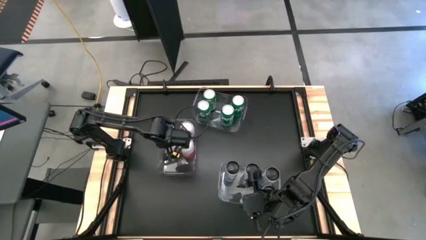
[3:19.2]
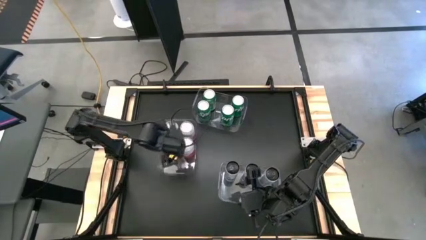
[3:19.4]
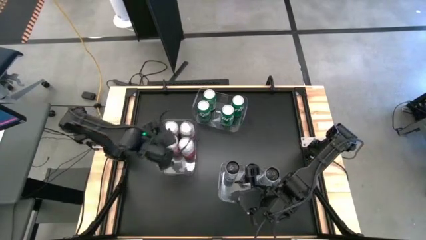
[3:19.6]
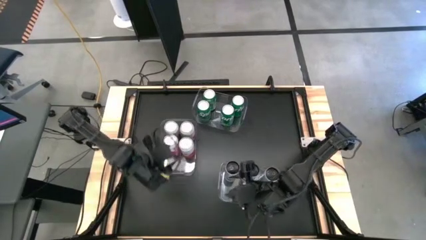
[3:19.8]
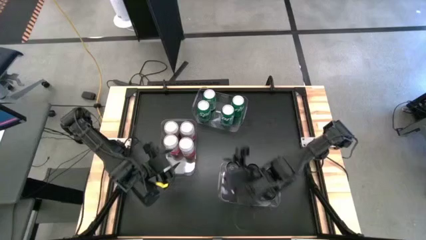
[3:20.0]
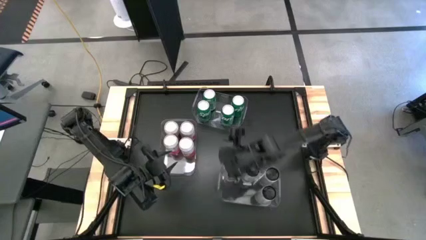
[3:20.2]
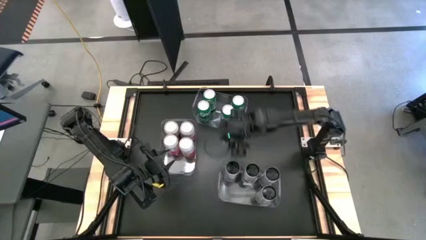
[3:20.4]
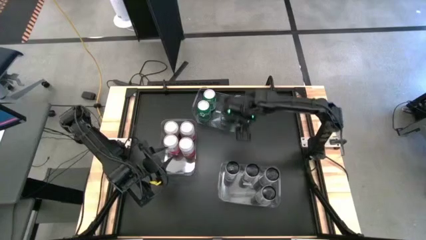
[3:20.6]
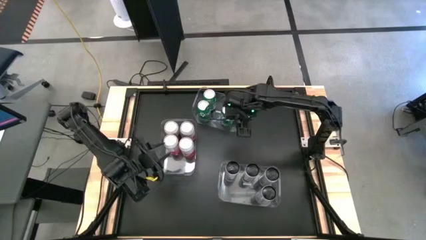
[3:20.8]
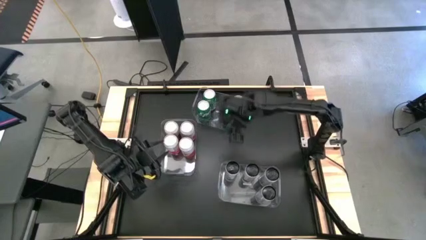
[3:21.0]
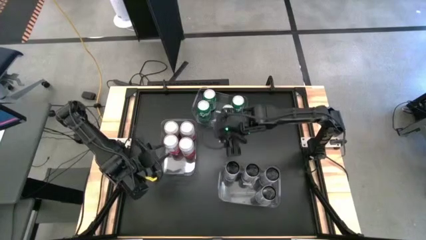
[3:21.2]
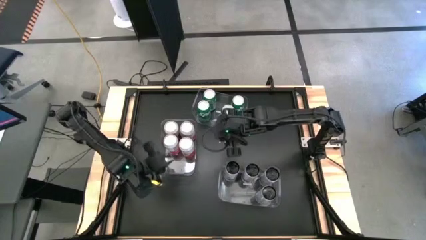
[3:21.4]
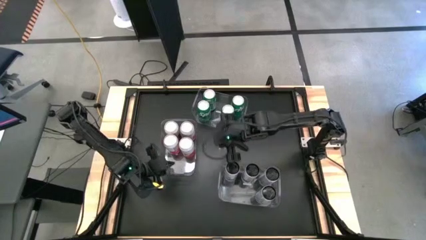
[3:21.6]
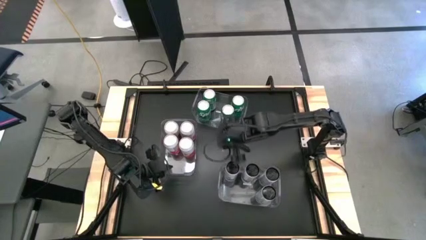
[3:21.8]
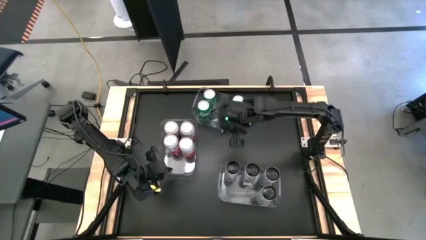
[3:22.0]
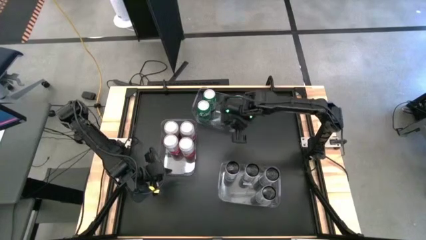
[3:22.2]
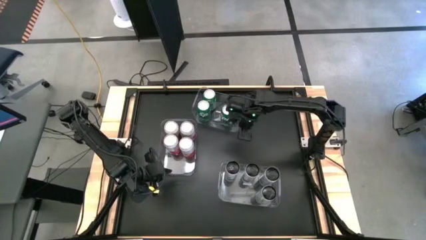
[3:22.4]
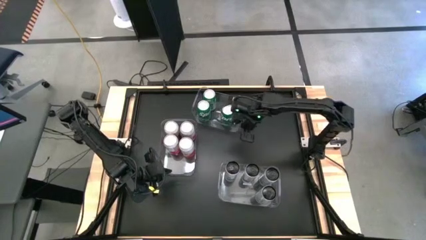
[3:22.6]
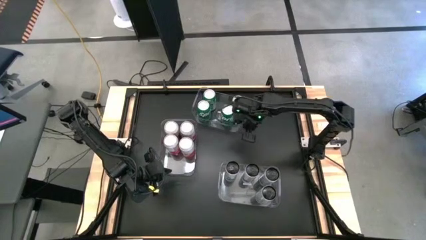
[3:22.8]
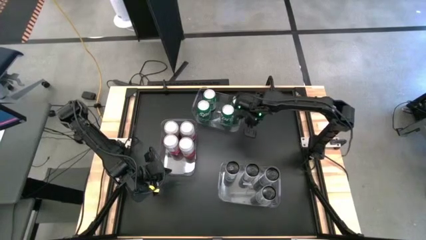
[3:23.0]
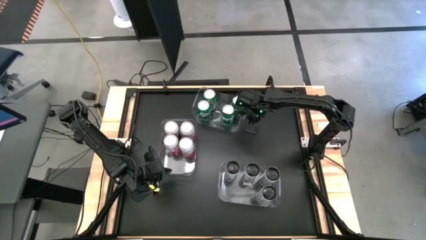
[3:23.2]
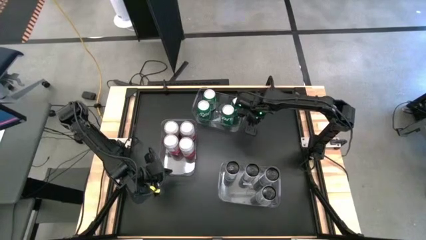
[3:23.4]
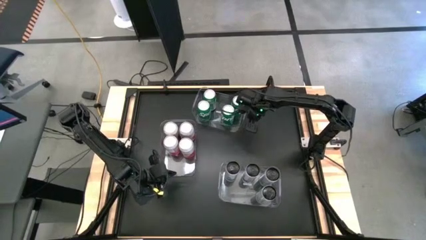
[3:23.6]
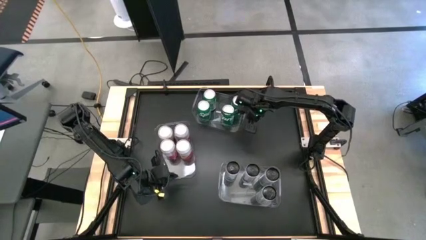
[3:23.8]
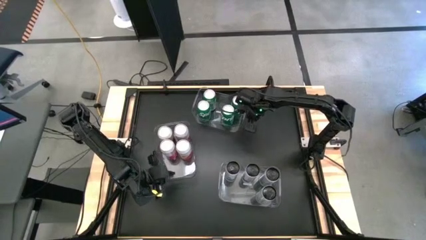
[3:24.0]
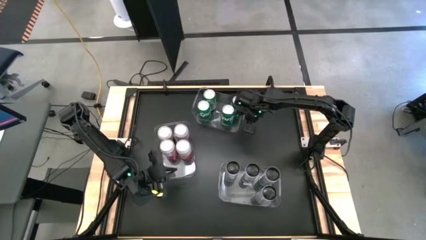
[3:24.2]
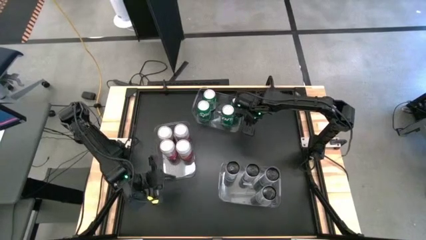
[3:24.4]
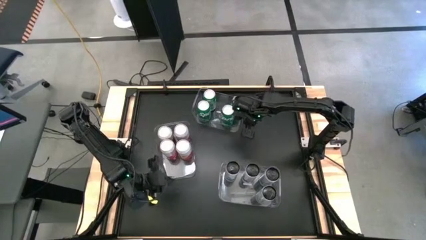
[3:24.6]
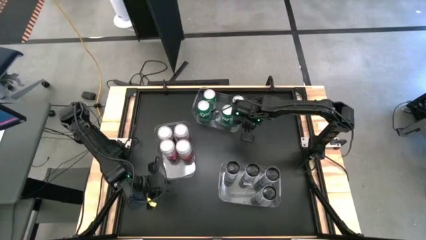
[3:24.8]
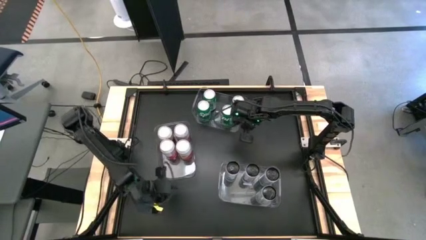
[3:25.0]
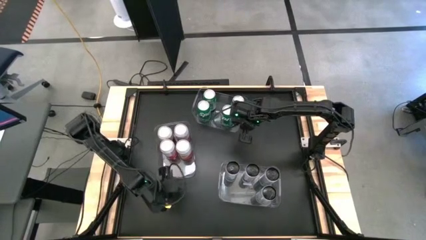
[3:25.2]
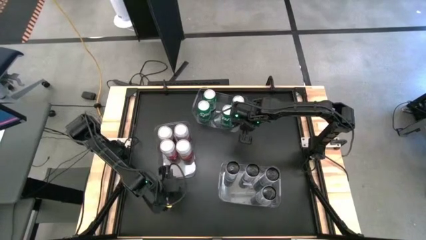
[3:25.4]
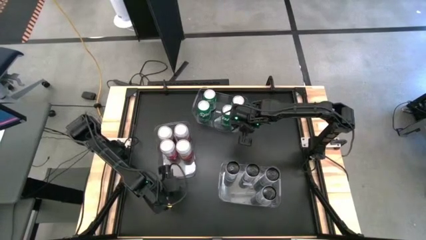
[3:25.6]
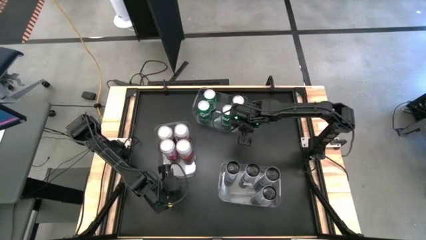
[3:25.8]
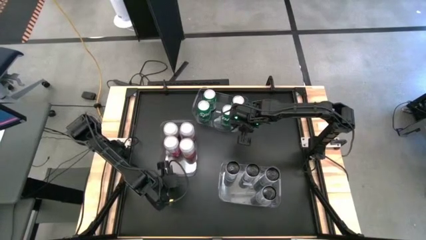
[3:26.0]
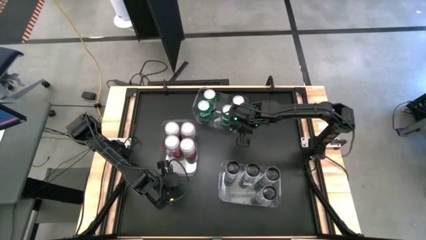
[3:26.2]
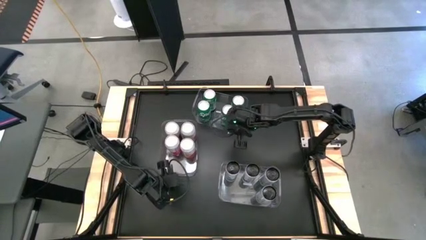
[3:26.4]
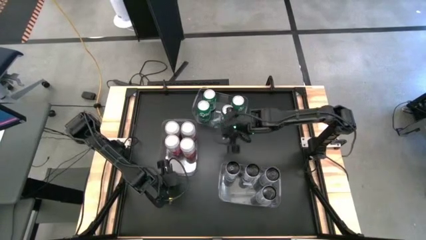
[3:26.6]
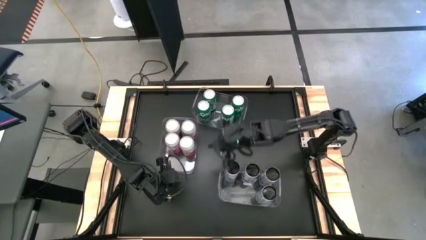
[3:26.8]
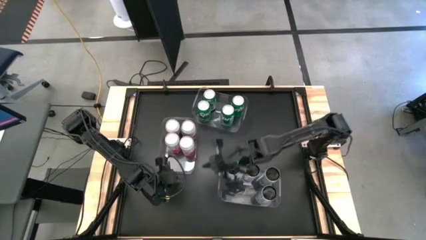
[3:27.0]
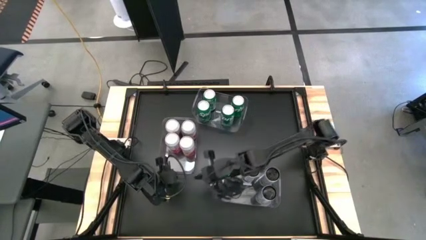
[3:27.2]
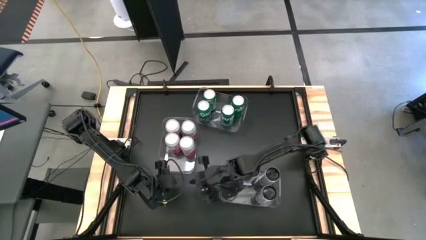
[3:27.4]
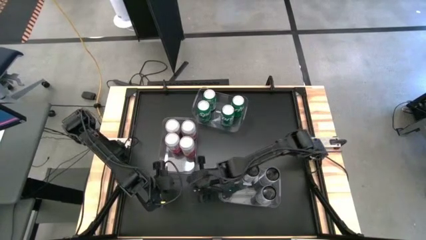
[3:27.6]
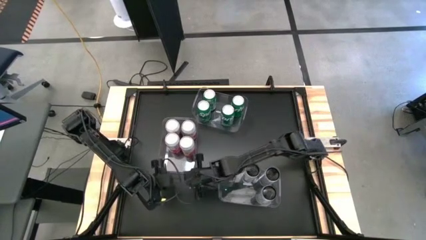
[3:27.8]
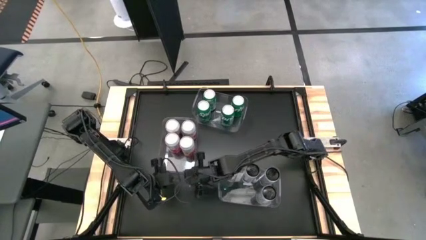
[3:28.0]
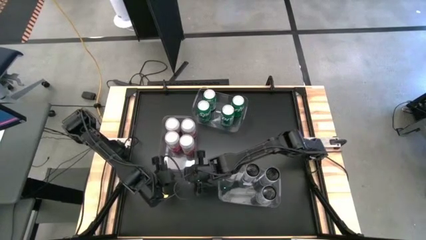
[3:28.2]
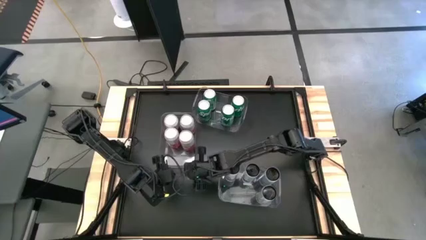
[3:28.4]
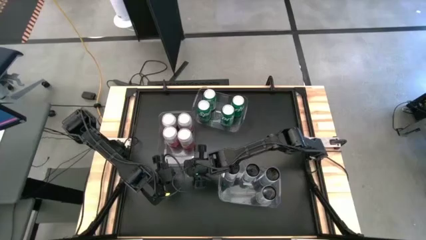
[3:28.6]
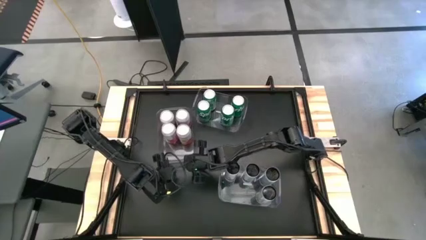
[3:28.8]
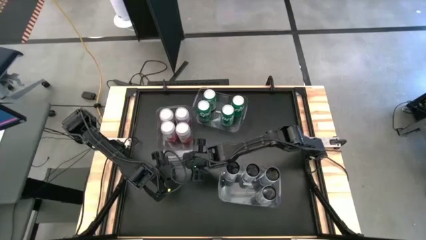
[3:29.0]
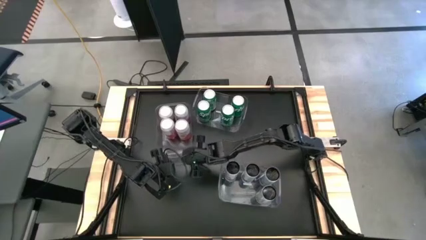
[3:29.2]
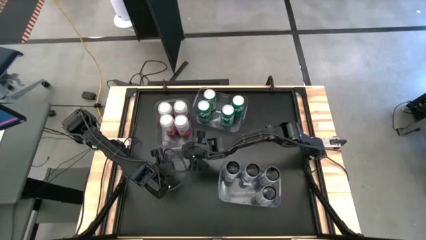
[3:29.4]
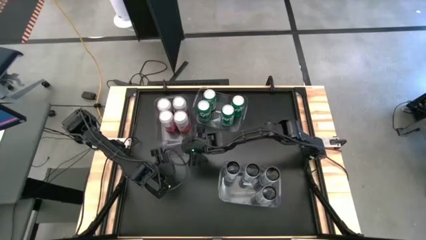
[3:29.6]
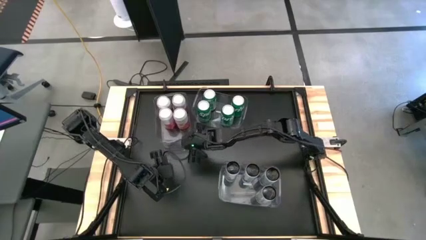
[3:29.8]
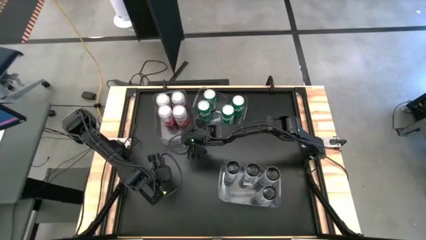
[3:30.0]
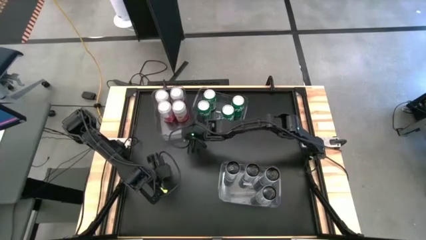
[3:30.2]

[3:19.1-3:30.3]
Task: Sort soda cans
Move the middle transparent bin to the top left of the table
